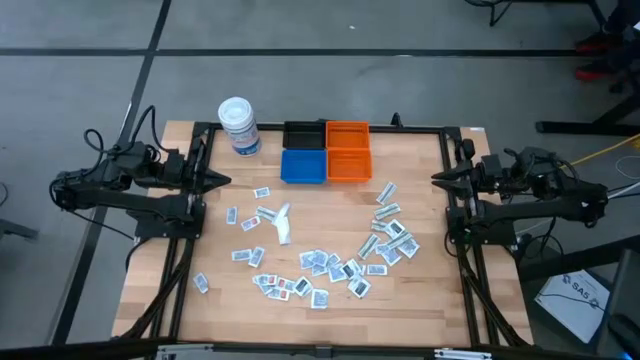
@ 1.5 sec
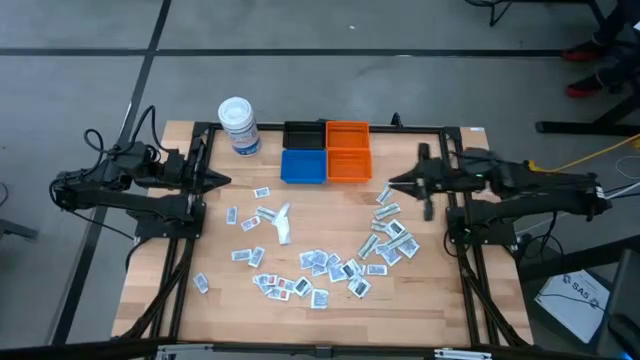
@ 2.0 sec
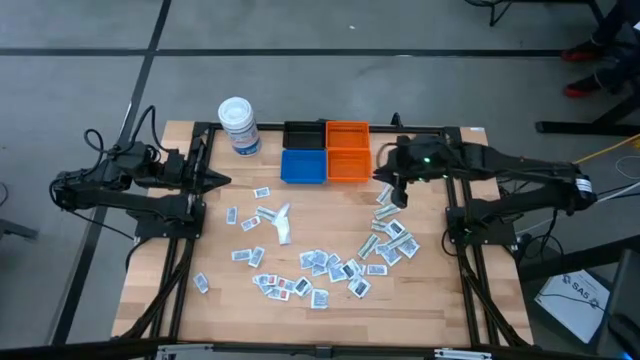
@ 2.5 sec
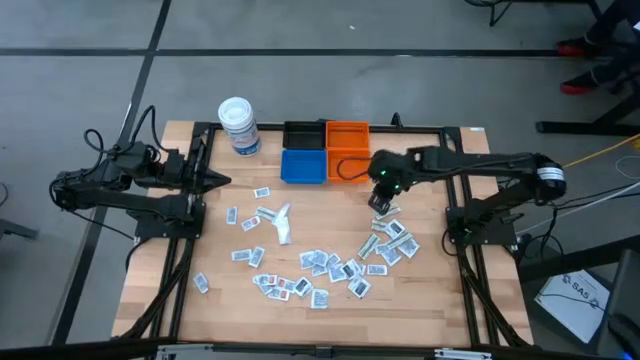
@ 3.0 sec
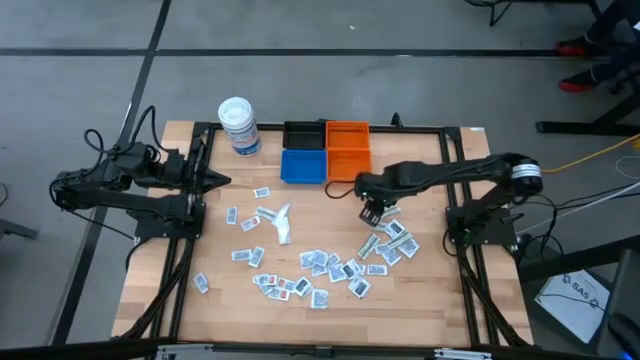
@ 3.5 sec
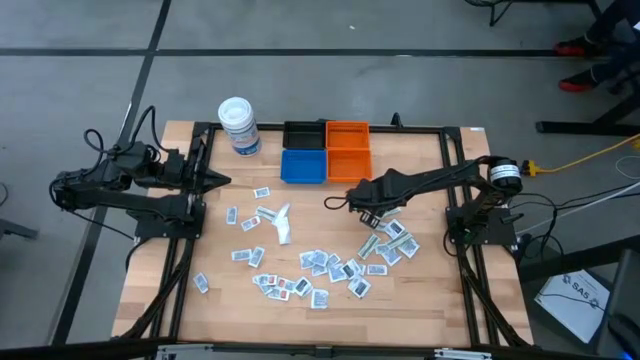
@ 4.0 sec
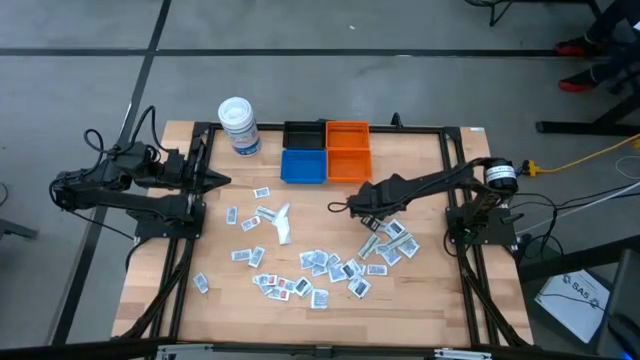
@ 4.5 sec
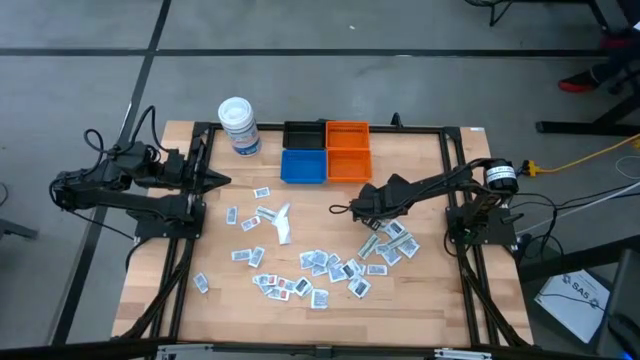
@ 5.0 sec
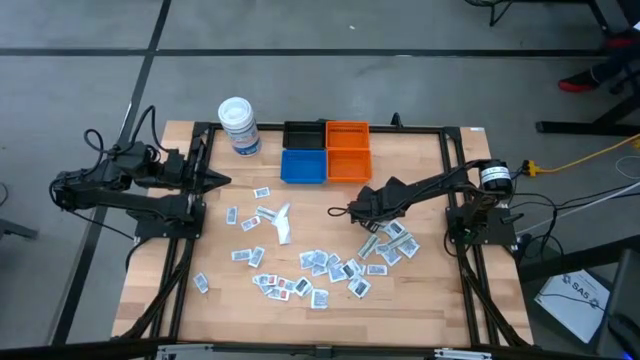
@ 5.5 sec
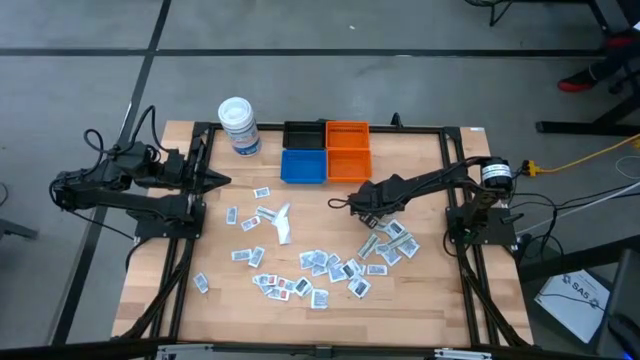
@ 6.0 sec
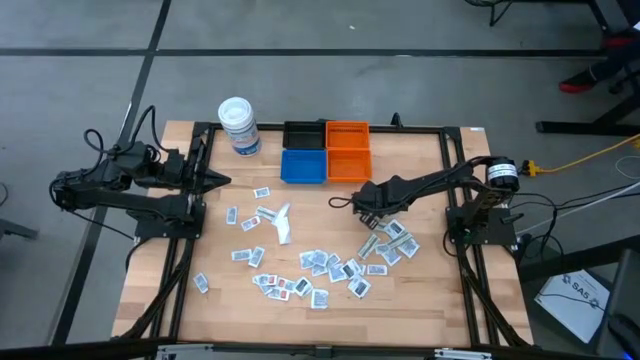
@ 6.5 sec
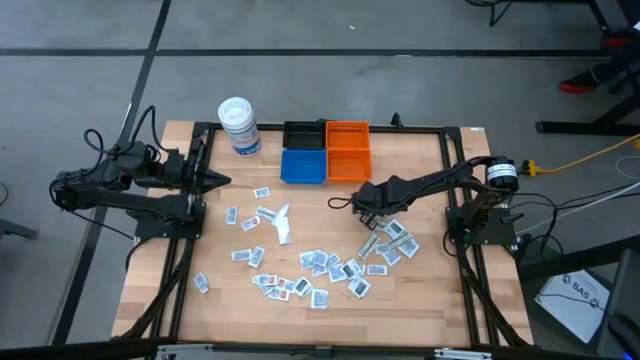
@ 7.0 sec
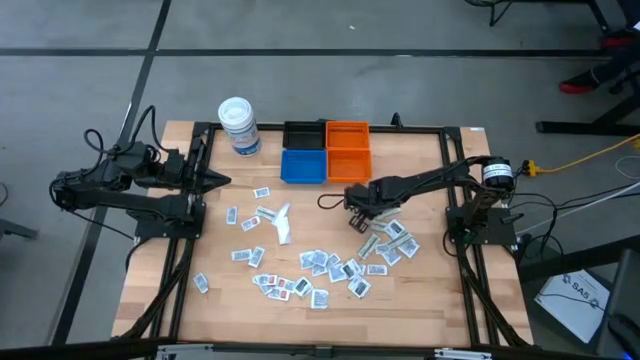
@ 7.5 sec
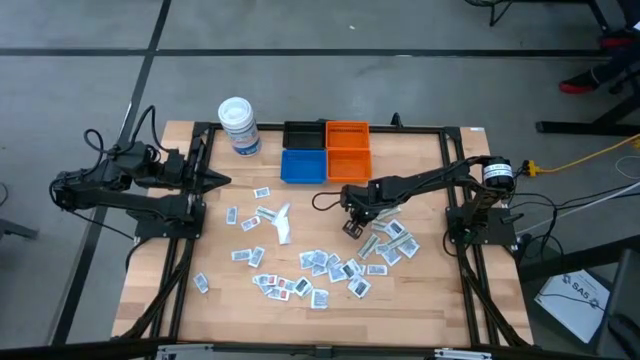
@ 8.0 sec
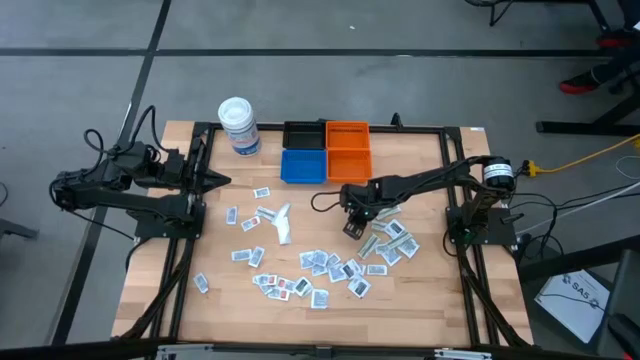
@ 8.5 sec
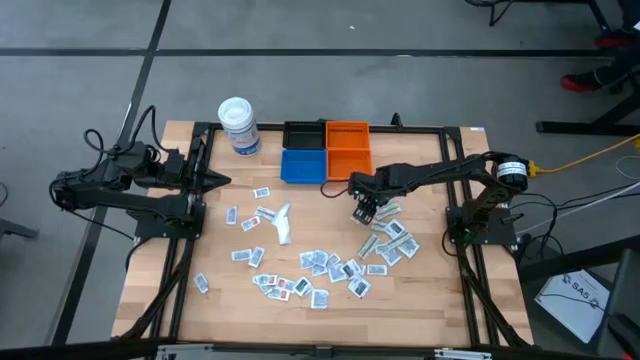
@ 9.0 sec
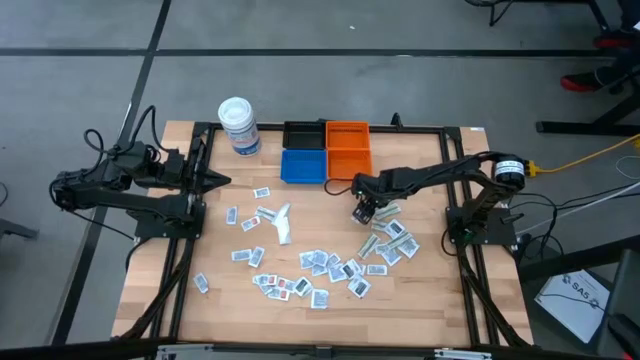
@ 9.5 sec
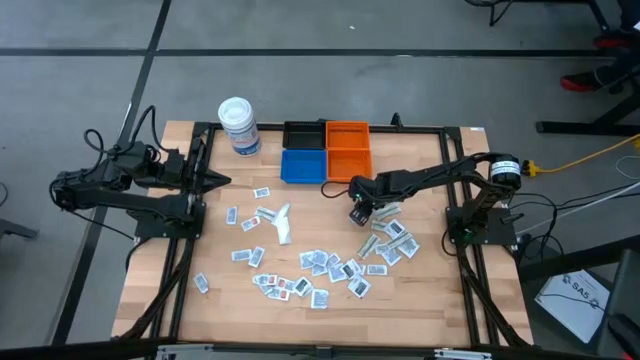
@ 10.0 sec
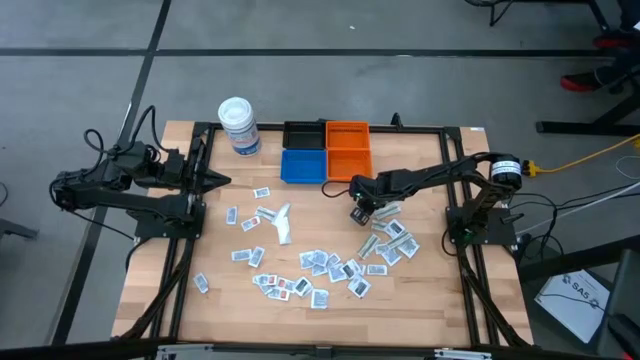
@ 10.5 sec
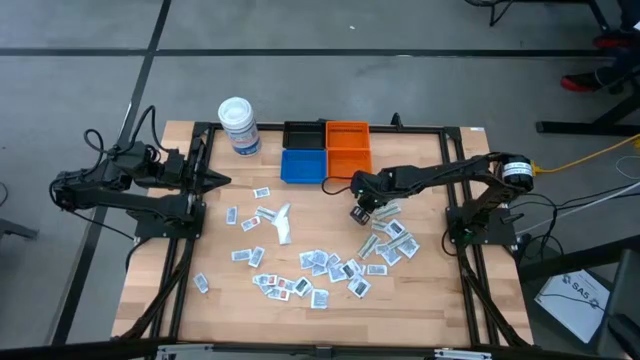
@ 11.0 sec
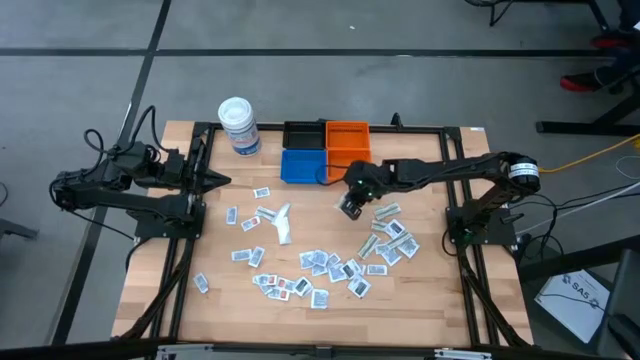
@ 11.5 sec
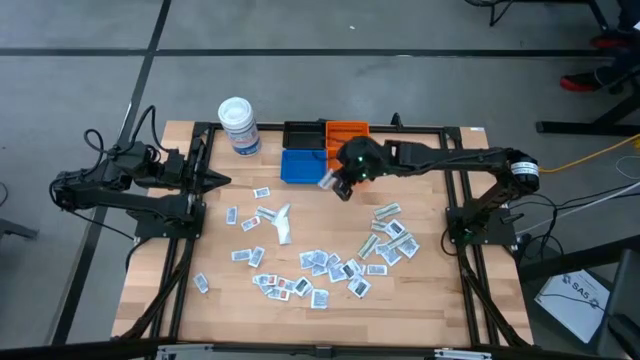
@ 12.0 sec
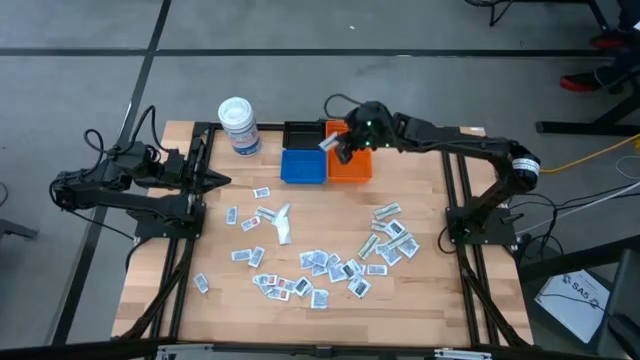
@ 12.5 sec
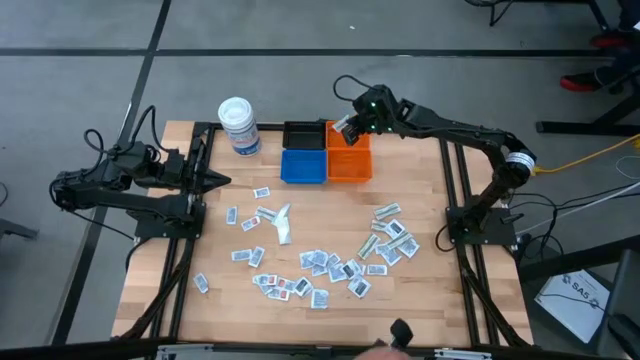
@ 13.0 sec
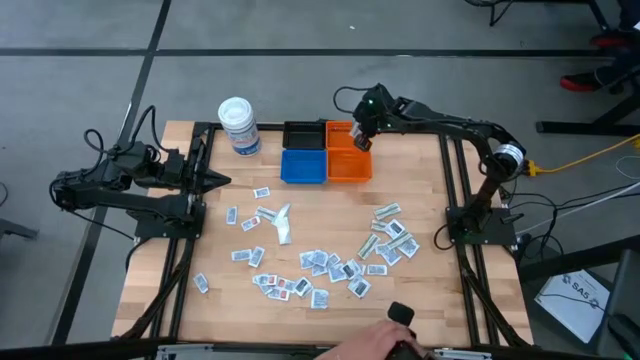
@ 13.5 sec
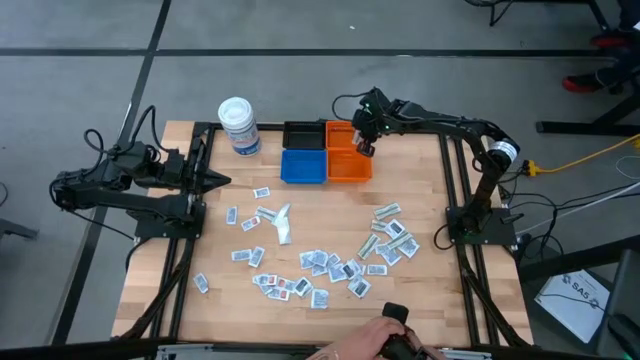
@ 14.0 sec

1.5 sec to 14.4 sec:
Task: Pick & Place First Aid Supplies
Put the bandage pack into the top orange bin

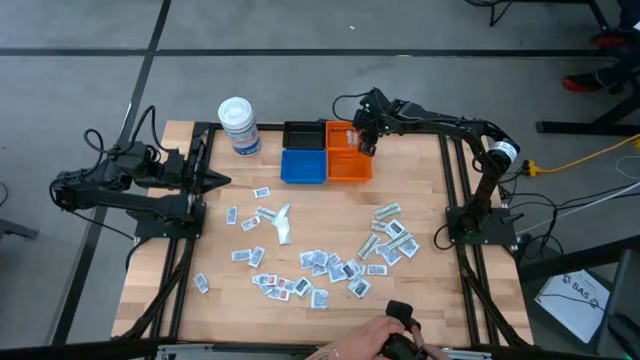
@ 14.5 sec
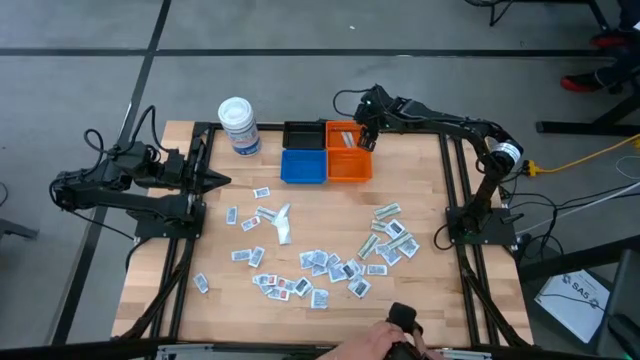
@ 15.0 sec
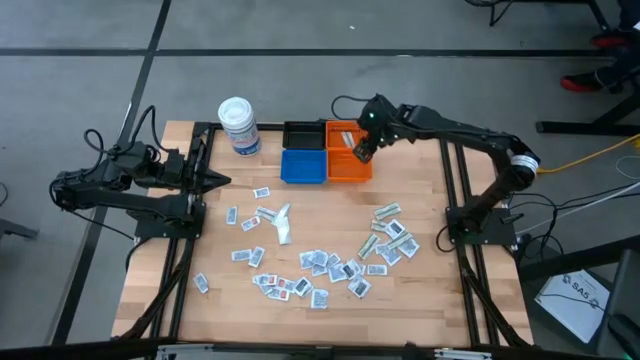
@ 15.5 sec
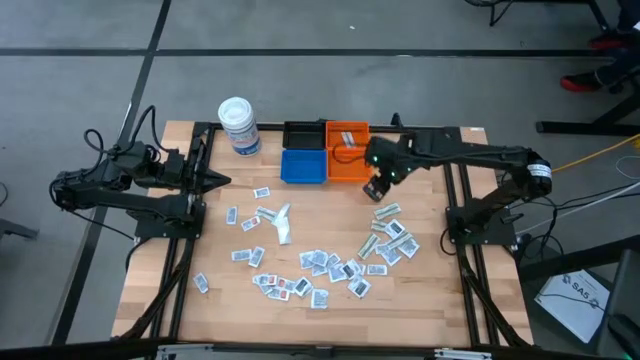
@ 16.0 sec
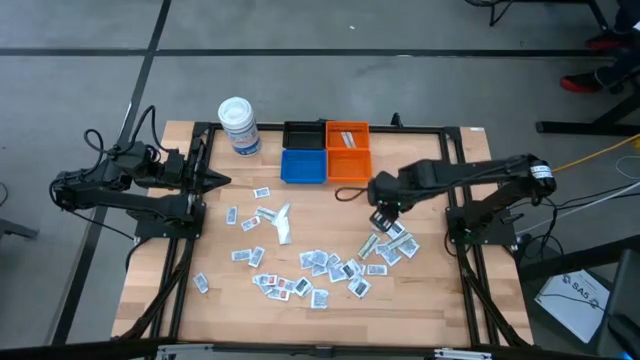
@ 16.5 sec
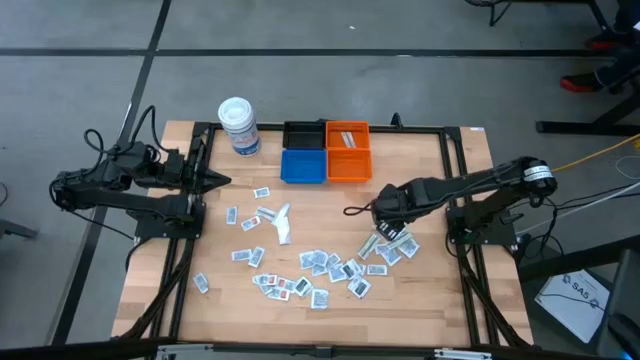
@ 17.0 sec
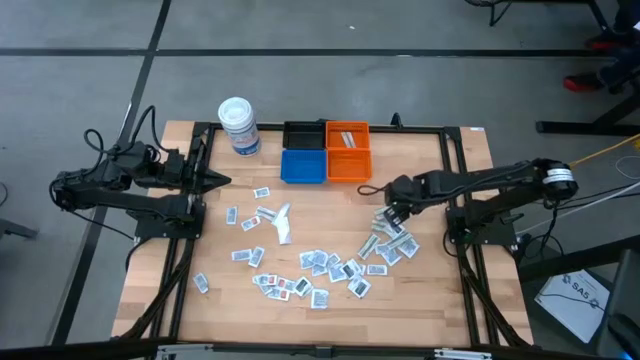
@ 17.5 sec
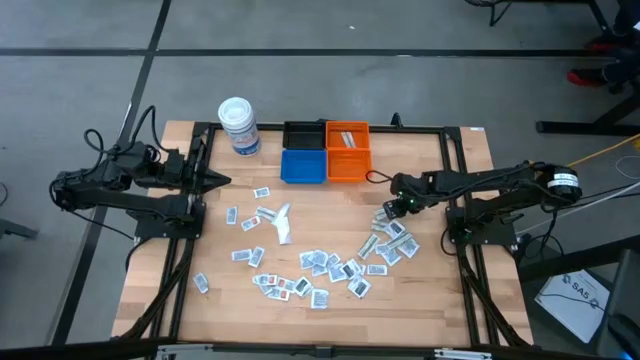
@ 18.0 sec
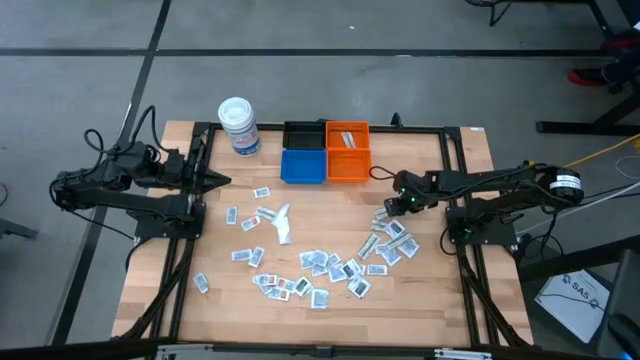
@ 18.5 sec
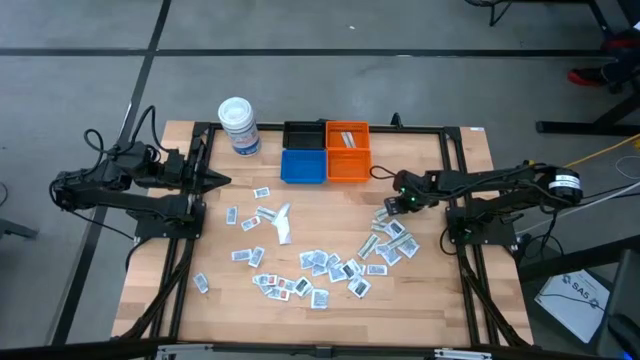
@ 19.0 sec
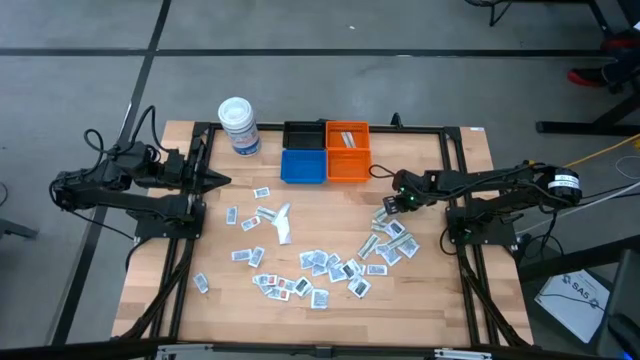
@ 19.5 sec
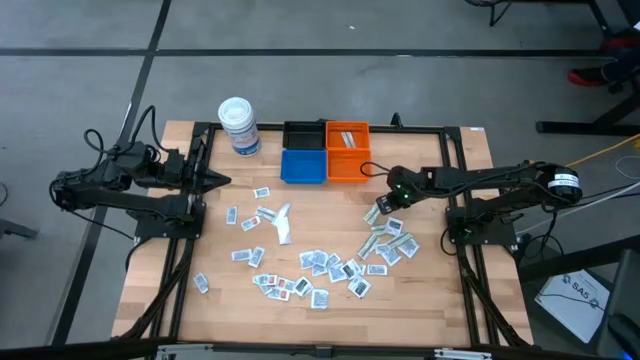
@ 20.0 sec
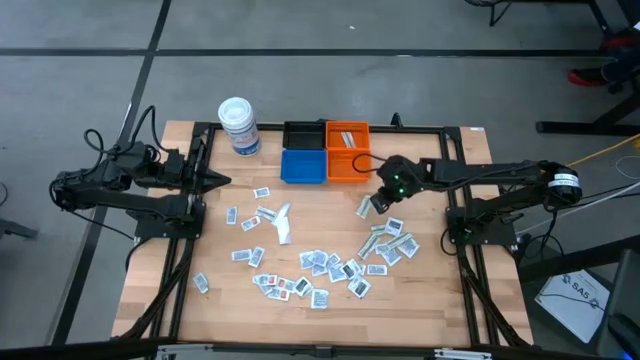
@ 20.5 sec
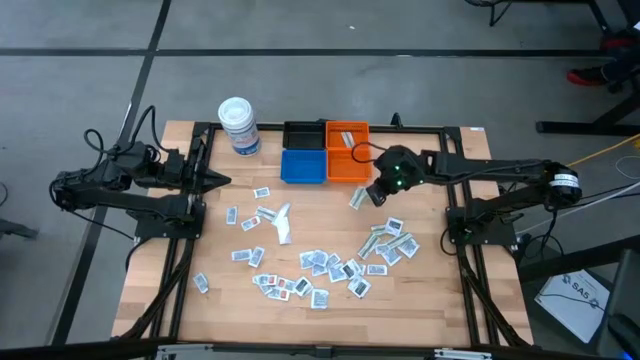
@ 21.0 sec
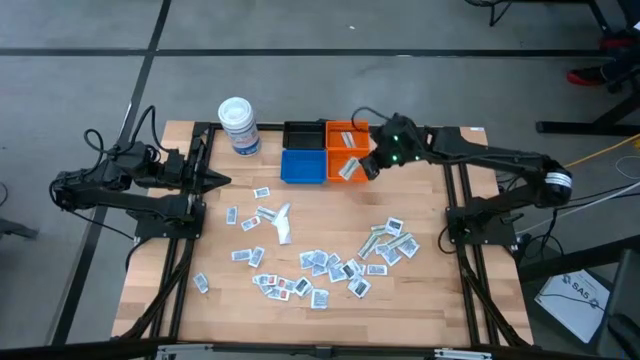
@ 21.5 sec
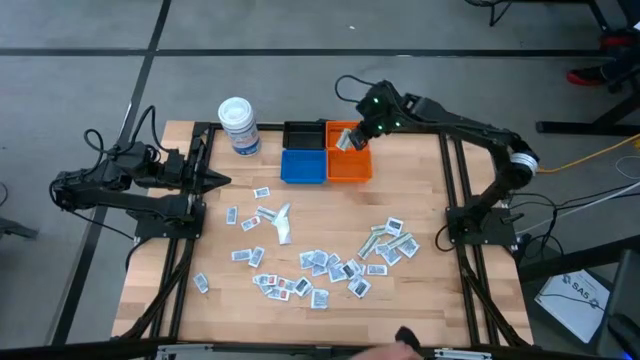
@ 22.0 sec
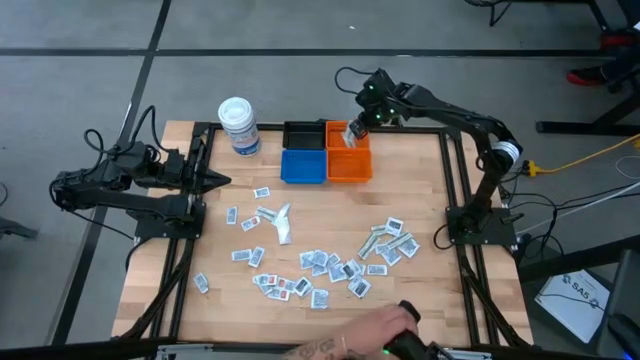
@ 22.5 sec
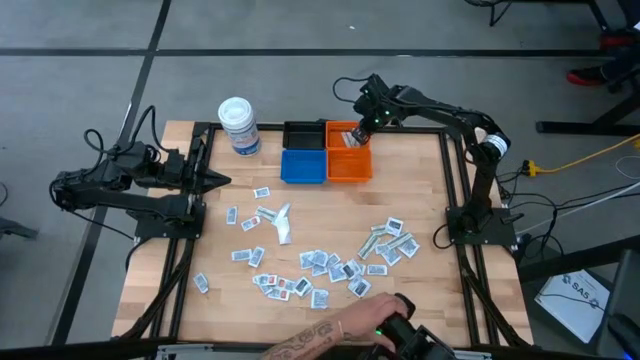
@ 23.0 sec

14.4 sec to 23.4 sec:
Put the bandage pack into the top orange bin
